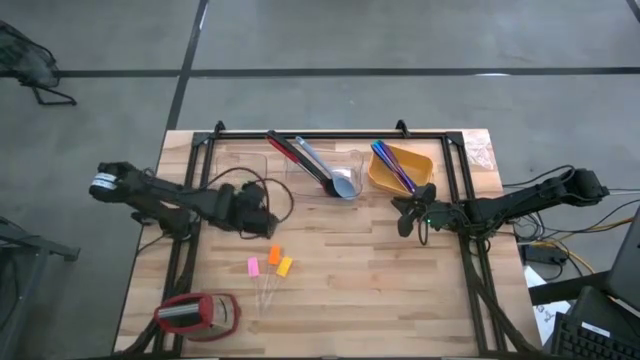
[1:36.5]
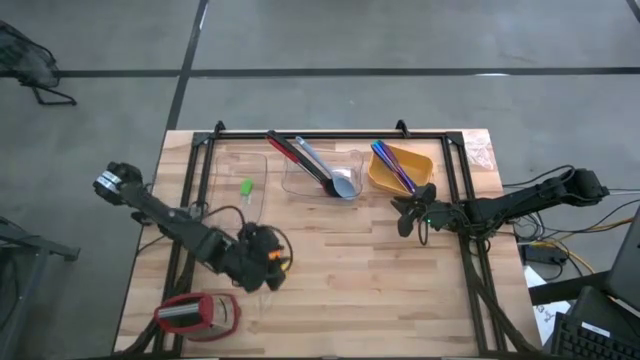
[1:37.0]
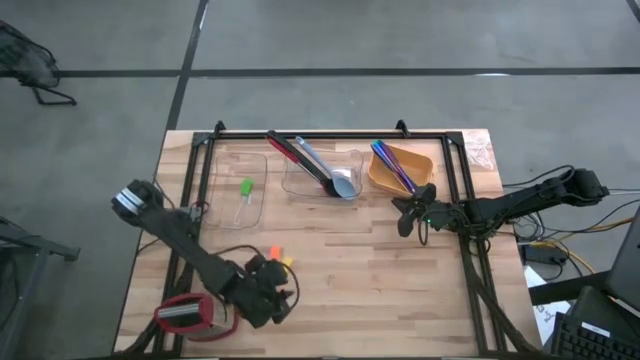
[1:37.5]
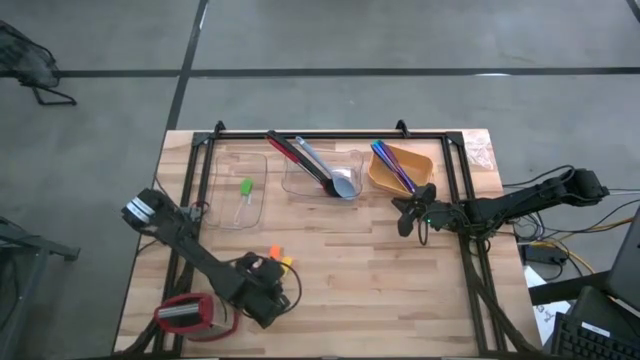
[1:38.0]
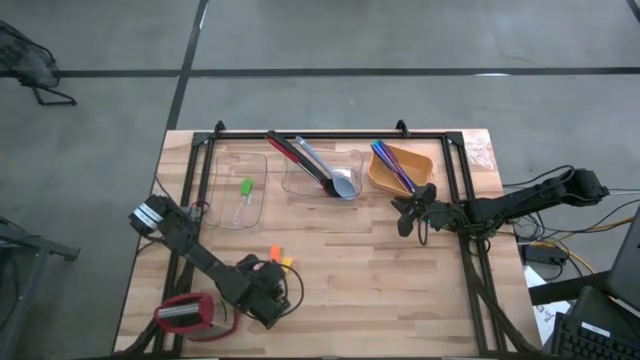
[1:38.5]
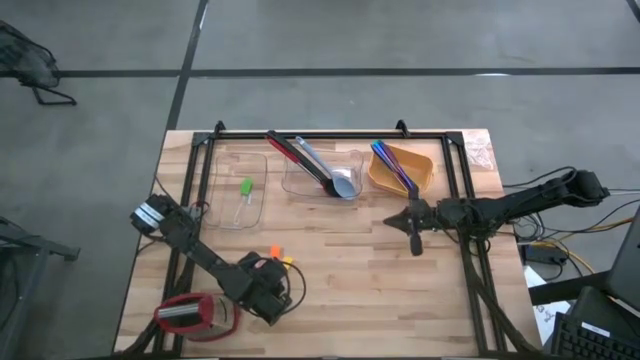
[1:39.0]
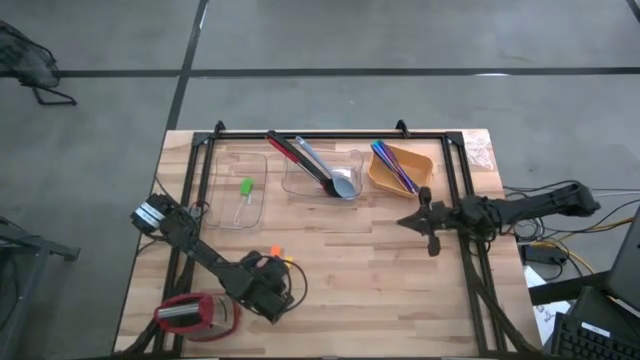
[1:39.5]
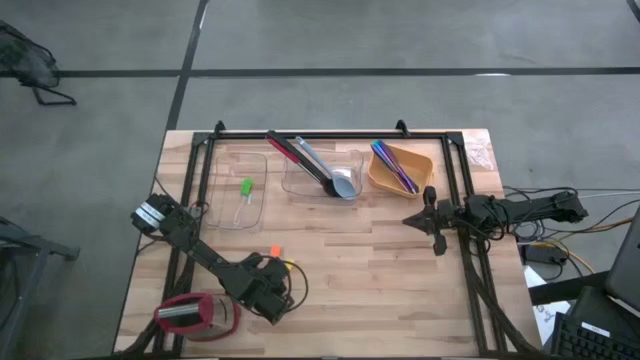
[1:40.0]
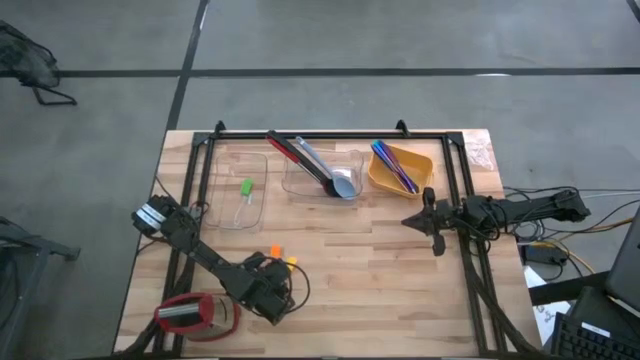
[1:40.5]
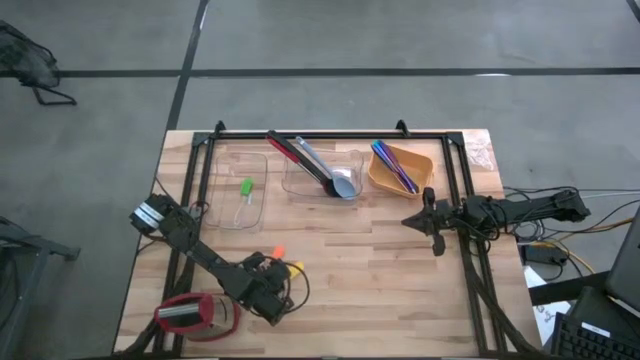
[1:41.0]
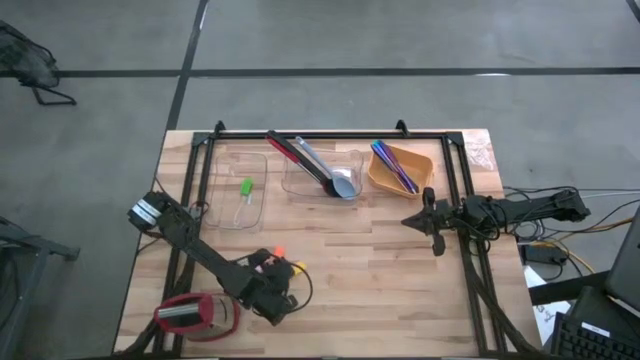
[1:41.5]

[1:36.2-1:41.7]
Task: Sort silverware by color (type)
Put the yellow spatula into the left transparent bin

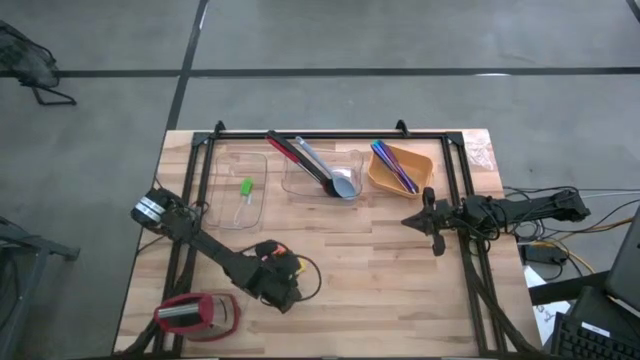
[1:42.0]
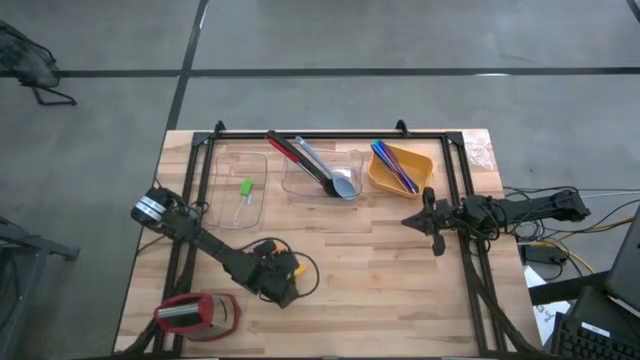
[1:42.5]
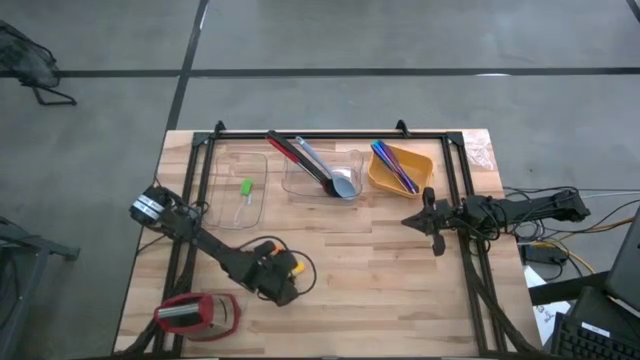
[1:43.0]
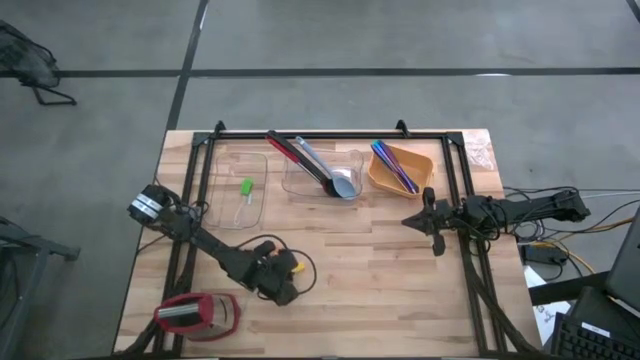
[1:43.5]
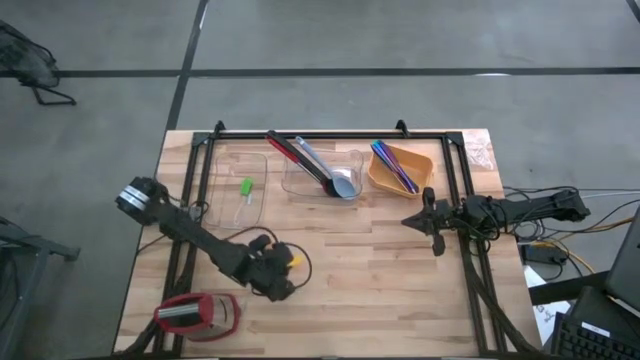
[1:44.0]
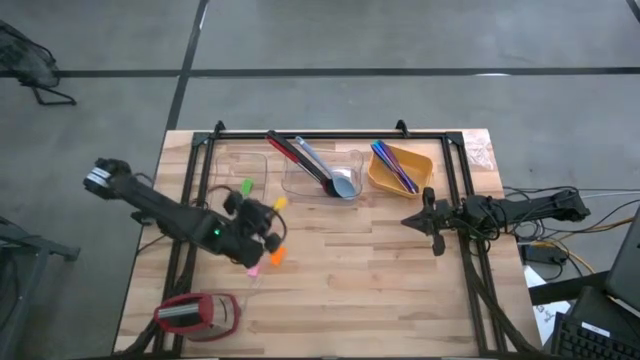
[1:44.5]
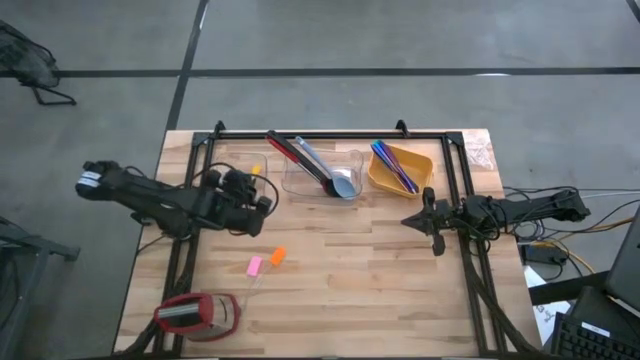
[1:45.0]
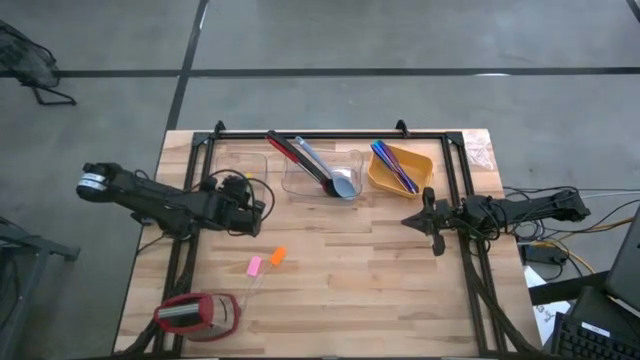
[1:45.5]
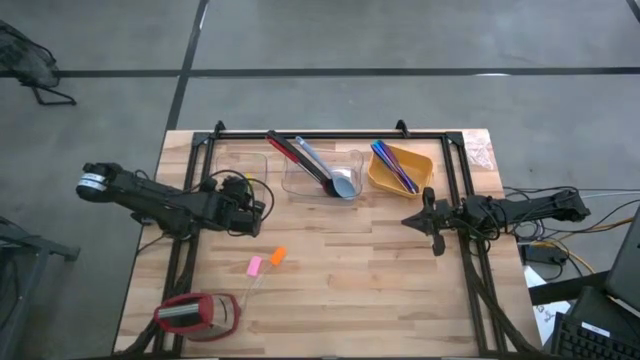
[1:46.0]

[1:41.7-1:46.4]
Put the yellow spatula into the left transparent bin

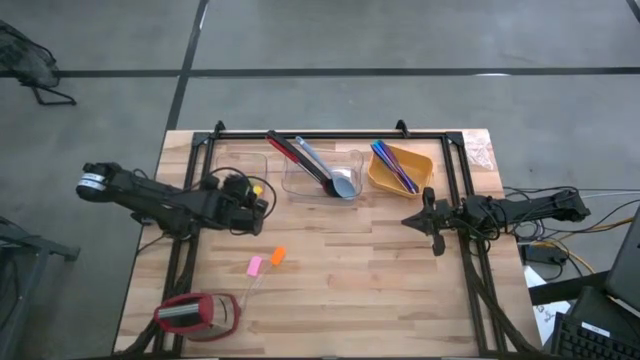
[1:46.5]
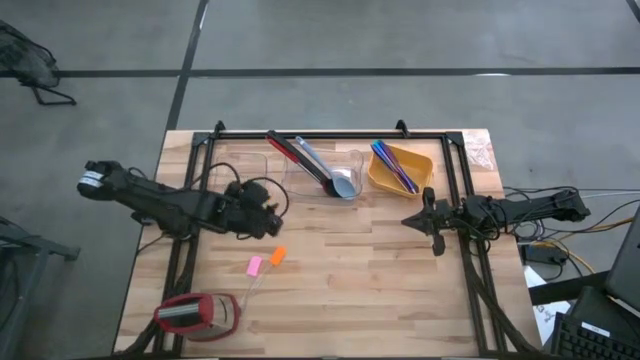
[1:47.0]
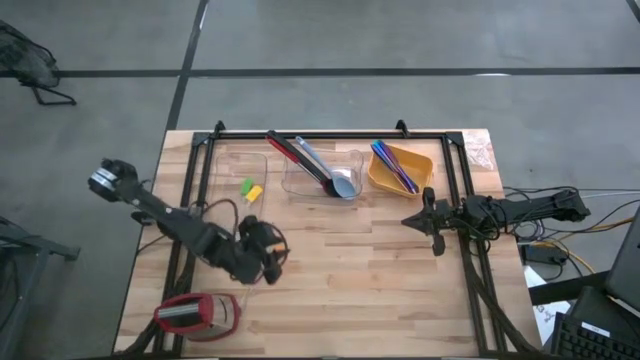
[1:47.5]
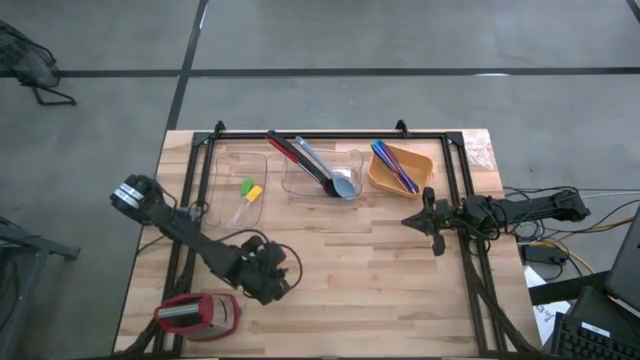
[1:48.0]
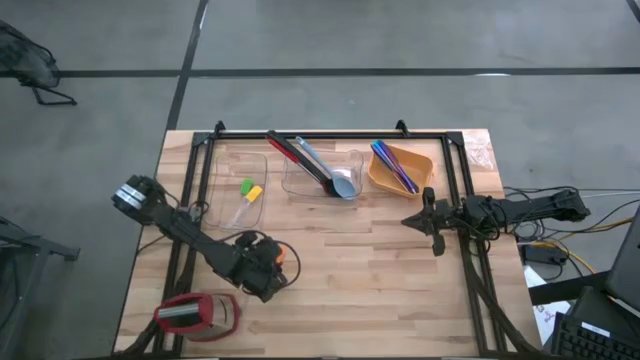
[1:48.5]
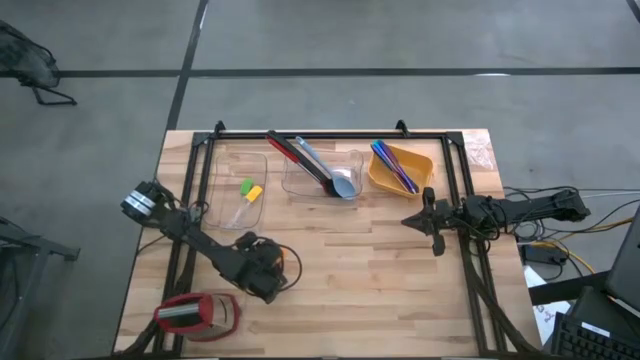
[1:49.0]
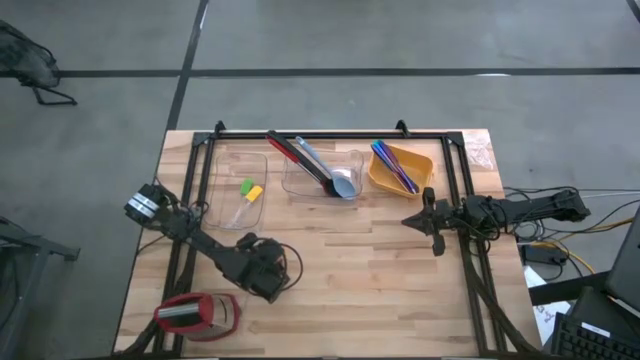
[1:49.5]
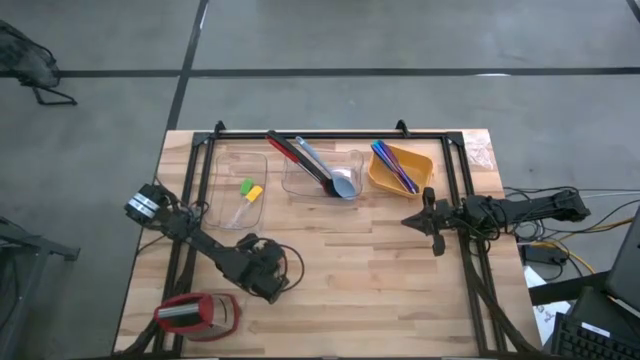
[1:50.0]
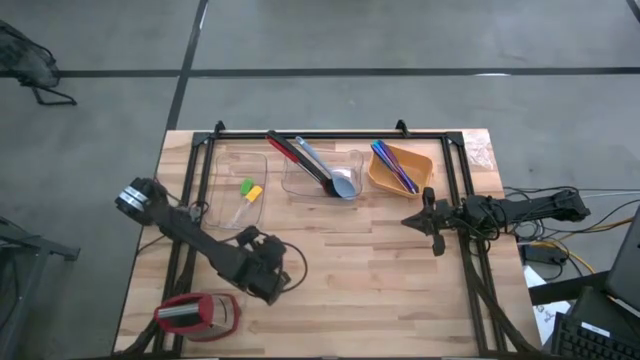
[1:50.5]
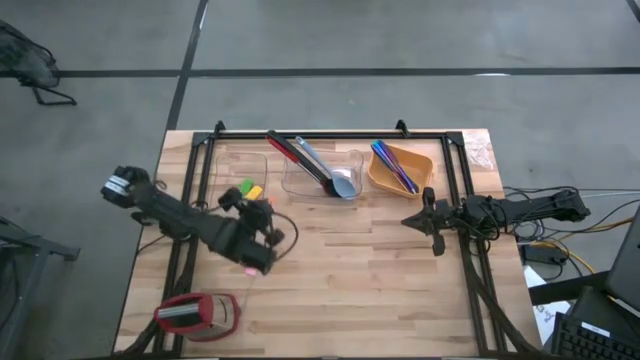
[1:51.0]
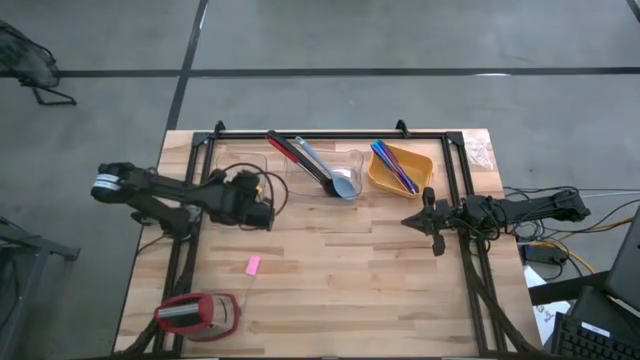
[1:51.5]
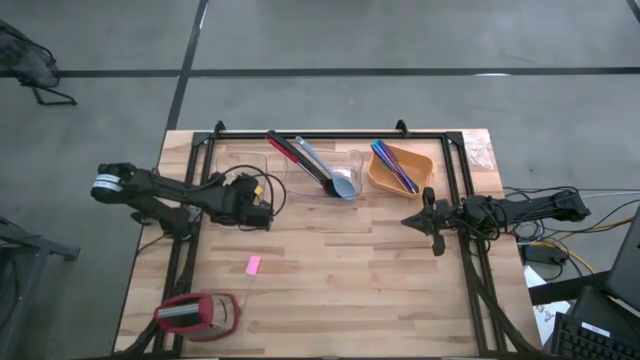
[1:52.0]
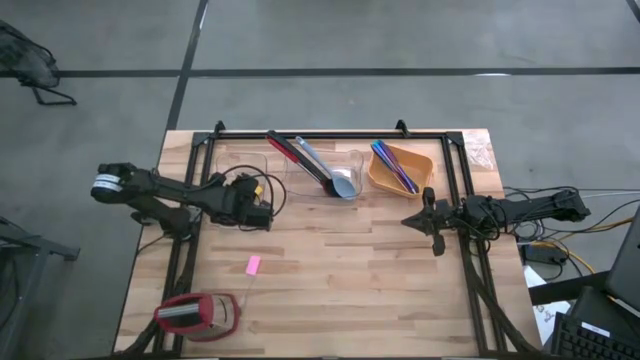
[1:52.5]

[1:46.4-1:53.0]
Put the orange spatula into the left transparent bin

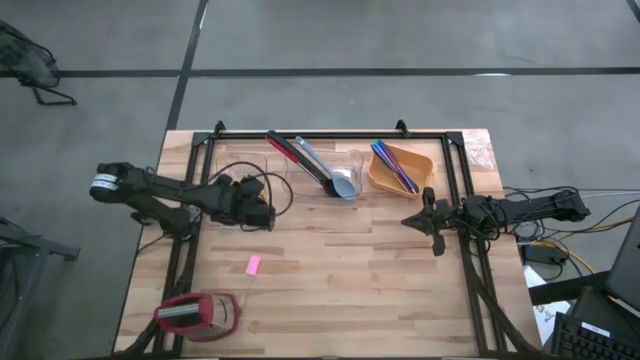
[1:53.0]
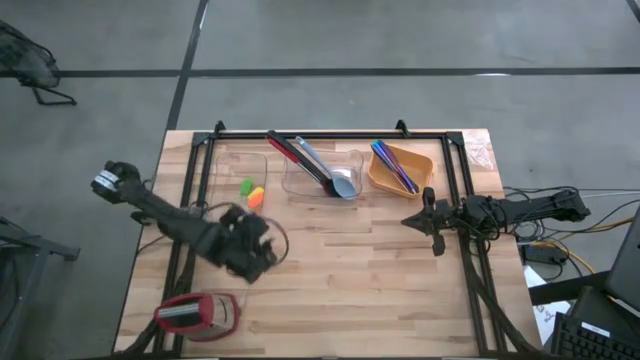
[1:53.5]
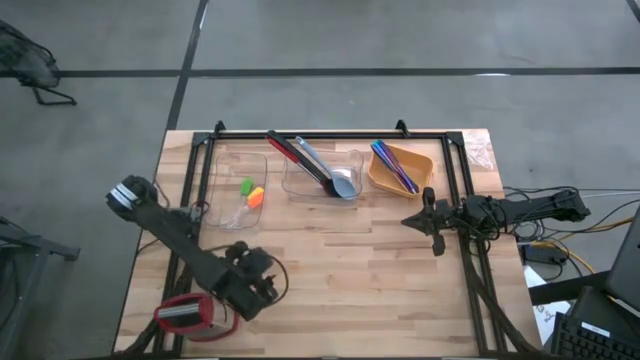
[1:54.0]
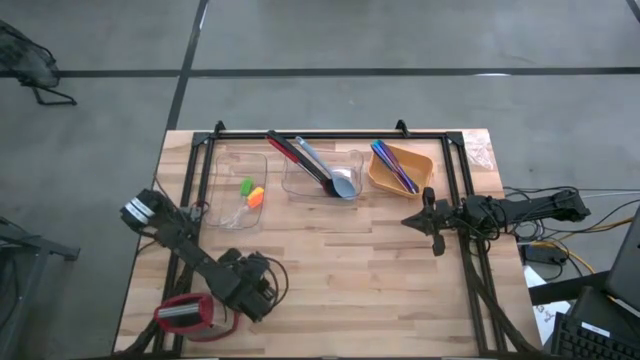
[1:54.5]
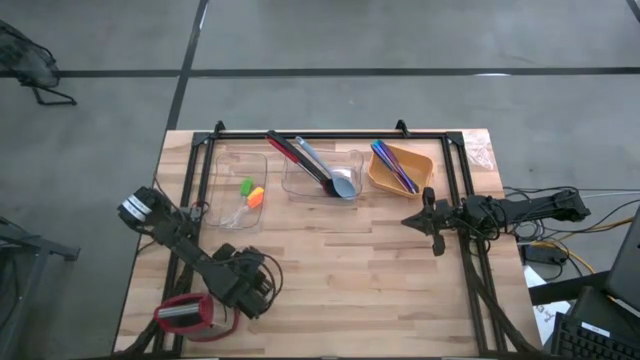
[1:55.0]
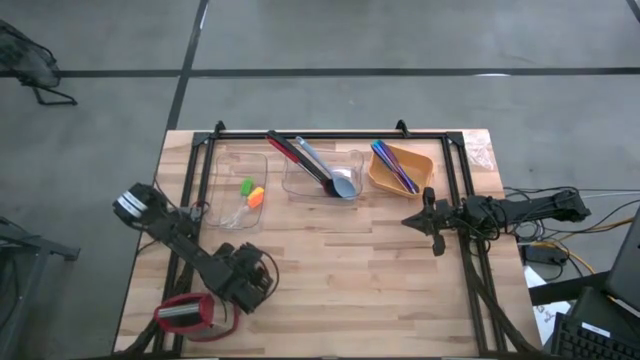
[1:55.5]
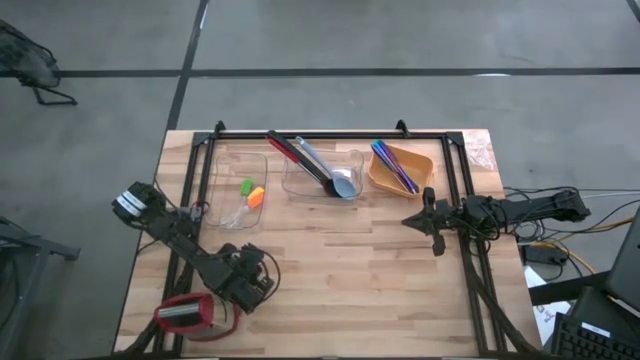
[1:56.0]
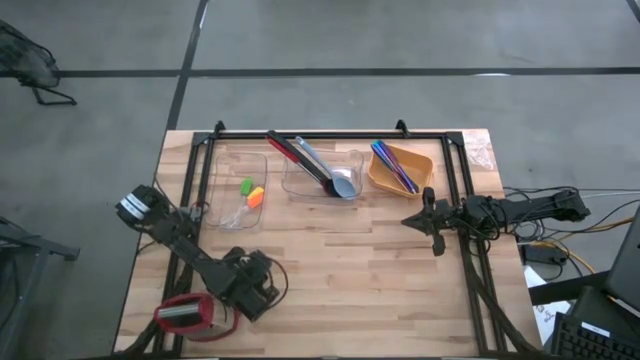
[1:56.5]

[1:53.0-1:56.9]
Put the pink spatula into the left transparent bin
